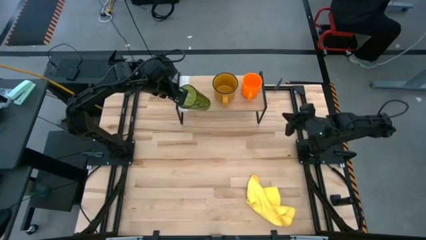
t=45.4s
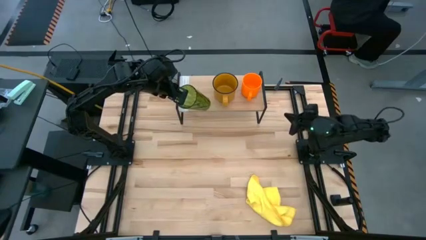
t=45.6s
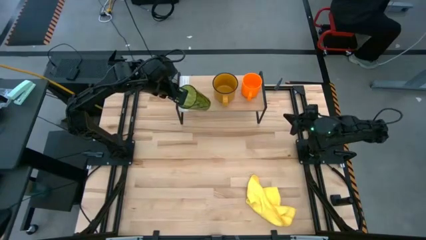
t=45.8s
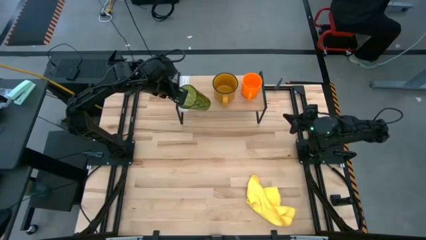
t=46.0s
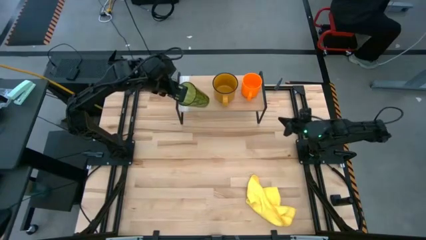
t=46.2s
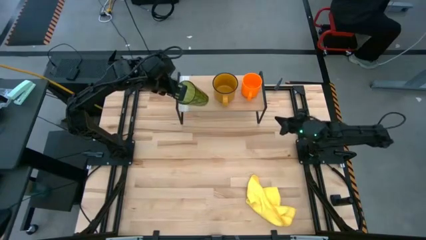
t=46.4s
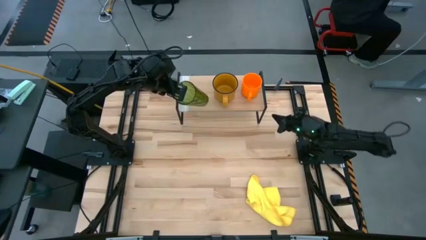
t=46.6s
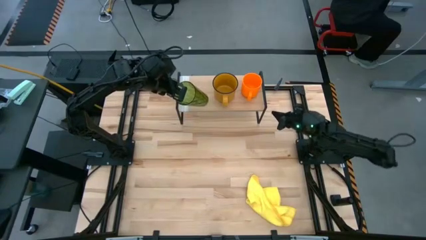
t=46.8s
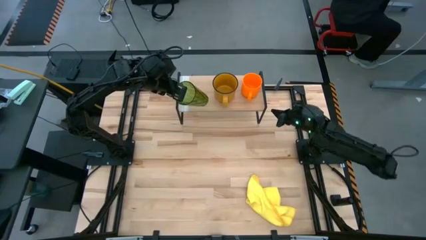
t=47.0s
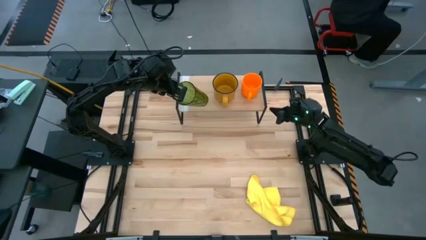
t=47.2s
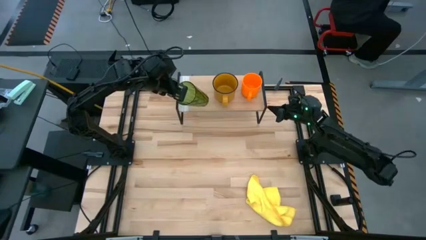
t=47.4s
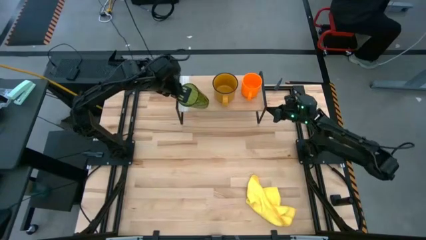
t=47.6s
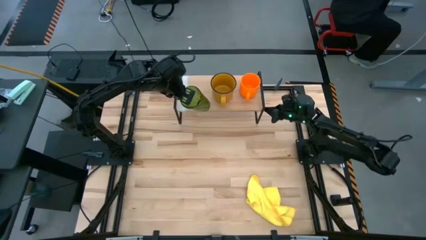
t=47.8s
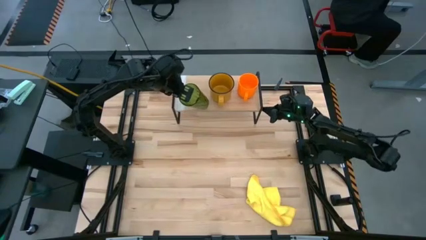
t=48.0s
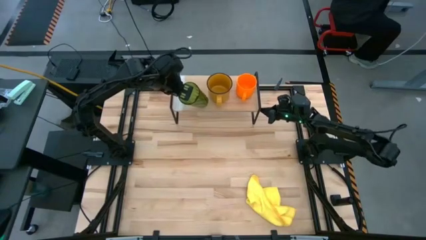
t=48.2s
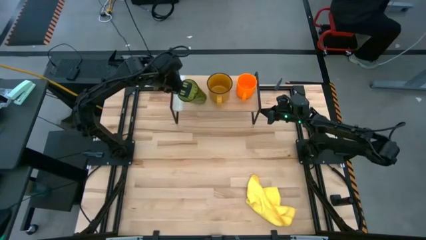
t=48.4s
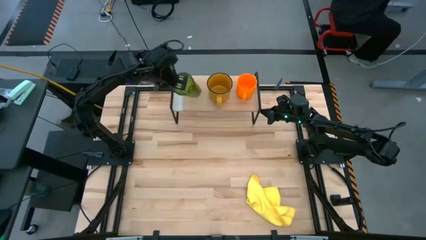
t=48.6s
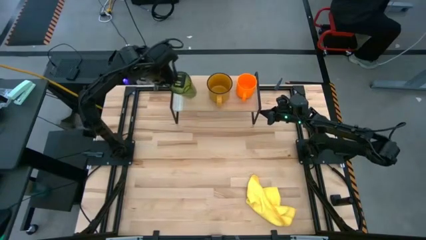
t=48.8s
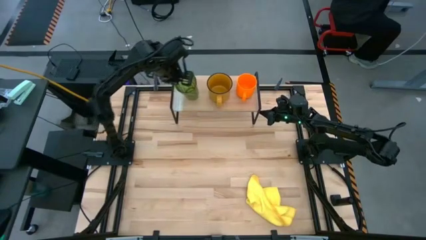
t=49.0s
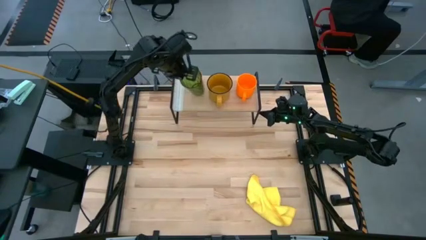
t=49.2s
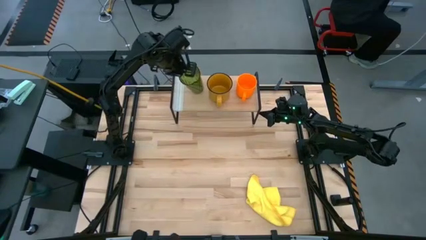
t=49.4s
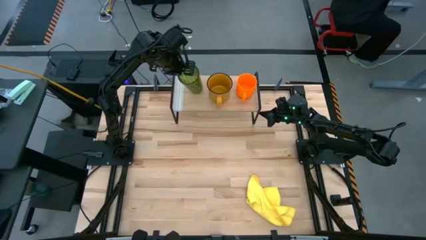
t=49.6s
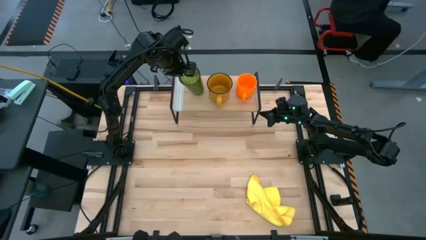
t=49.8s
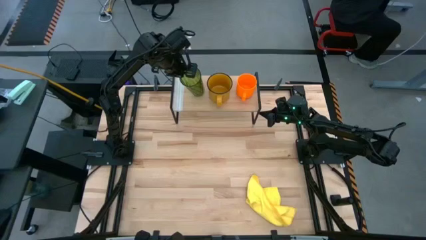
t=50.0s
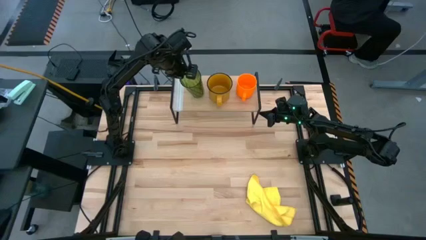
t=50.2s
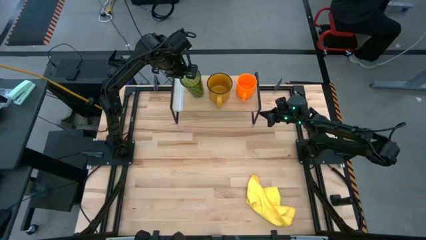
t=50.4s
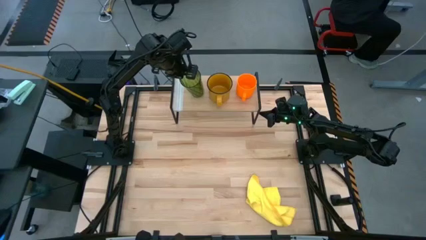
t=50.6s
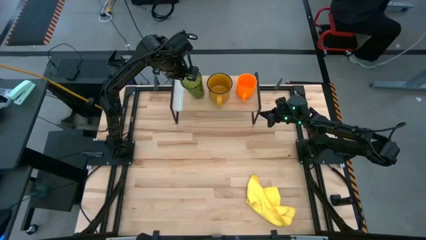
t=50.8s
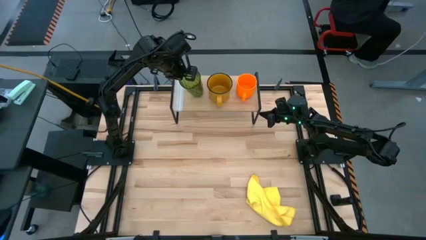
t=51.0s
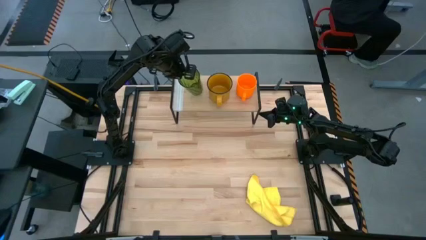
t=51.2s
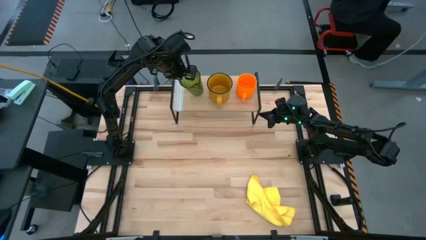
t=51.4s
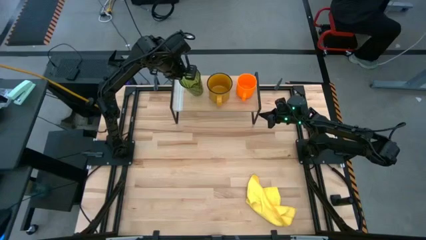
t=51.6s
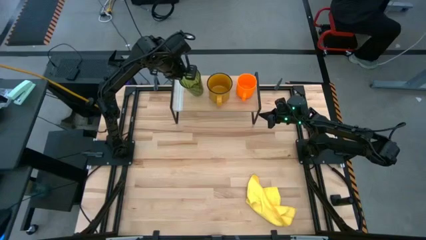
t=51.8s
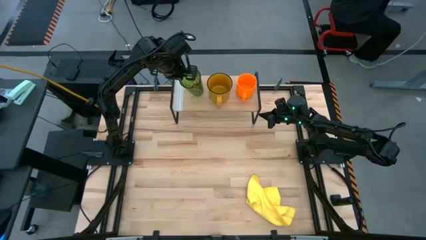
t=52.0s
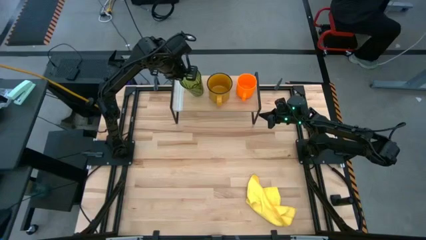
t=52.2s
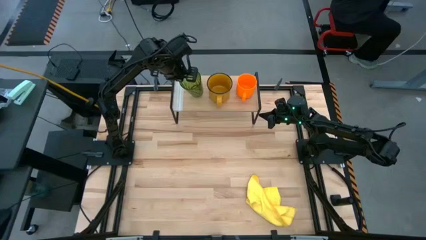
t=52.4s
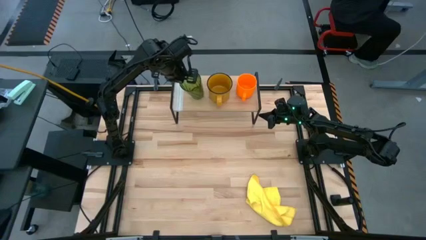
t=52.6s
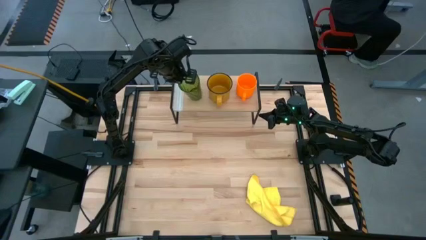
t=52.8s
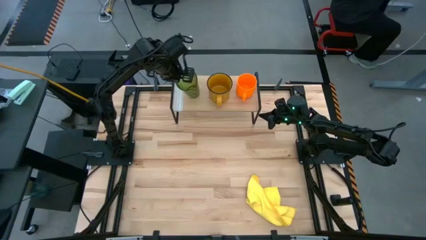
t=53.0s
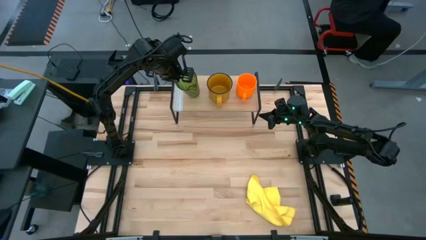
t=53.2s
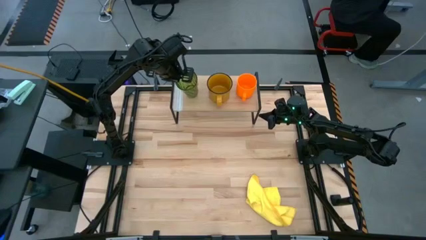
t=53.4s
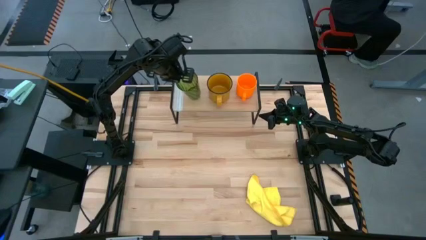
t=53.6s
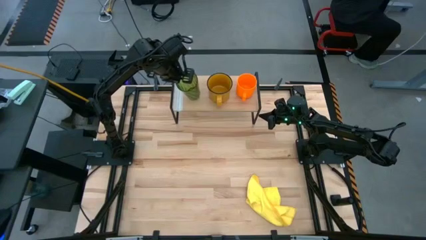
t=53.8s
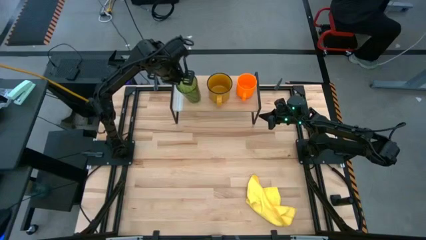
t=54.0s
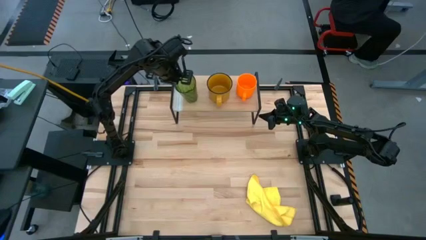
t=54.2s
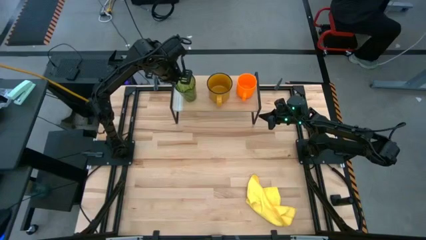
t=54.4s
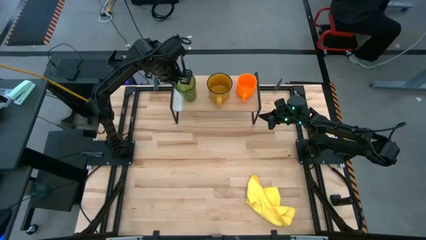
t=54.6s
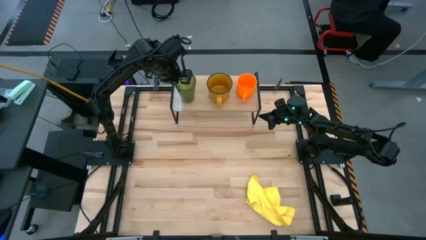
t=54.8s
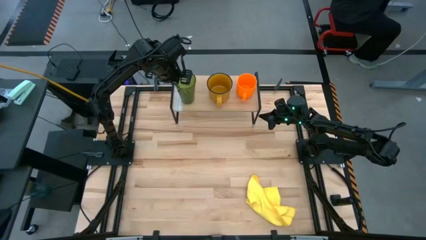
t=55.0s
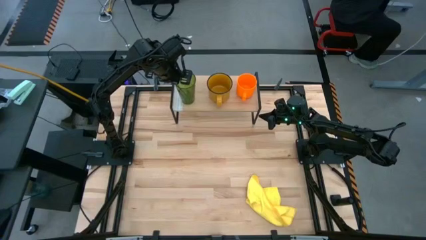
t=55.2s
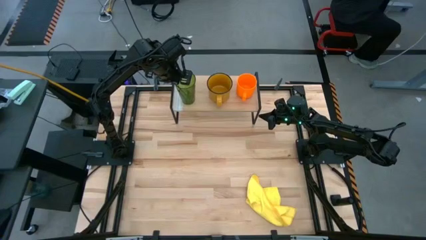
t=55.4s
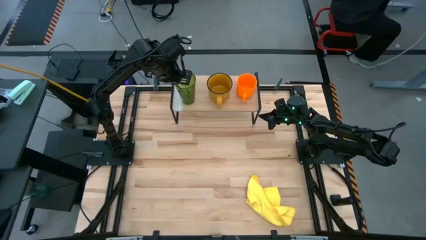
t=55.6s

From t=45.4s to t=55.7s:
Task: Stack small to large cups/mugs on shelf
Put the green cup on the shelf
